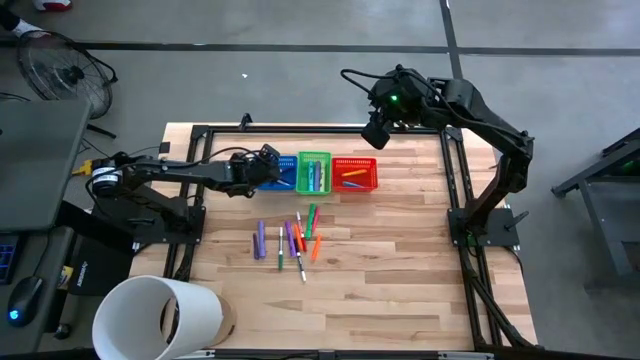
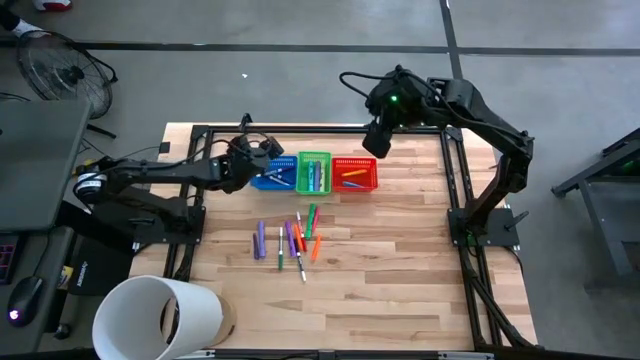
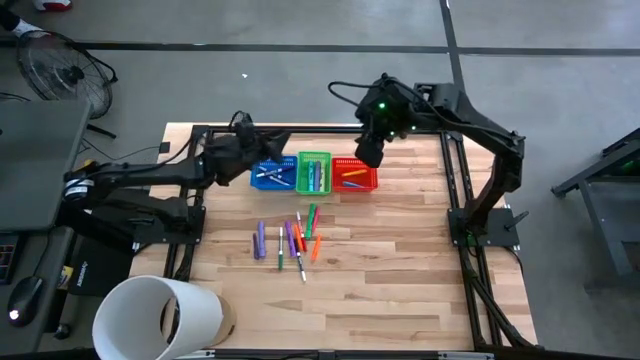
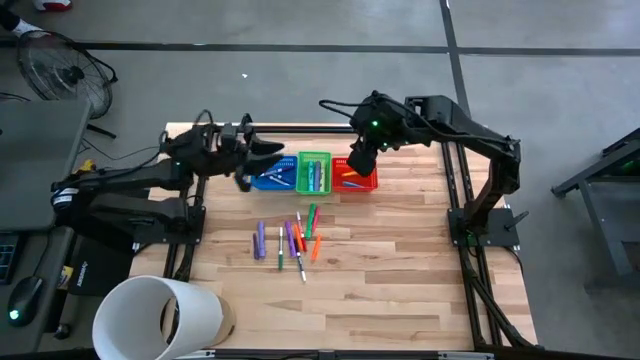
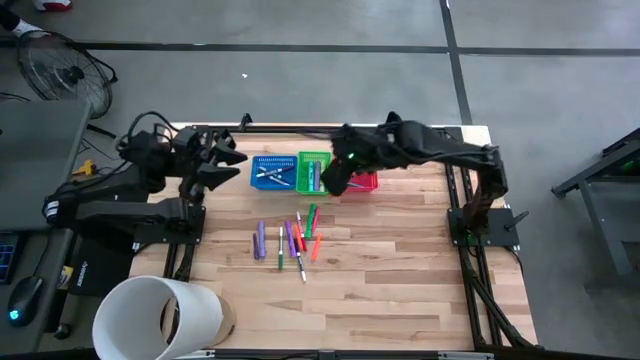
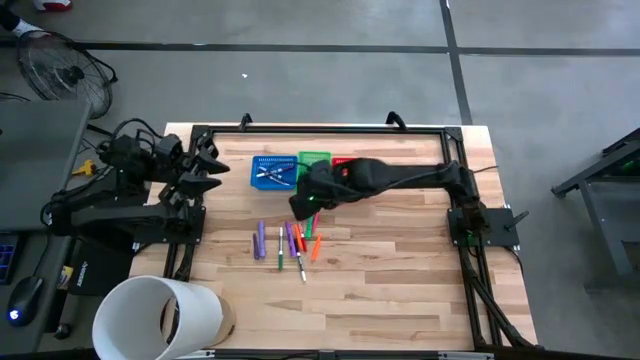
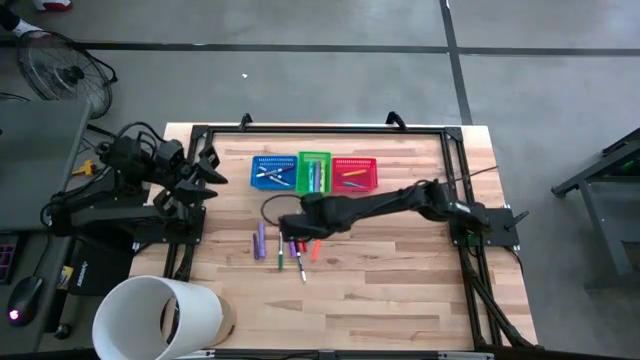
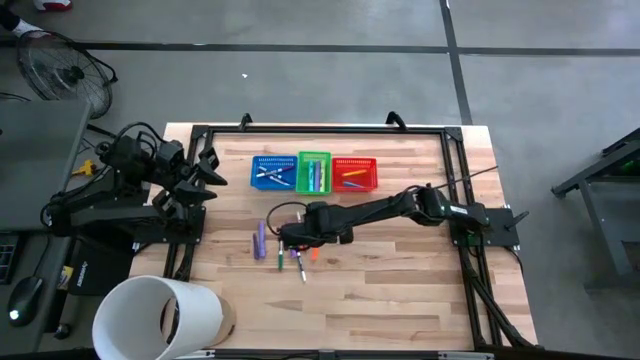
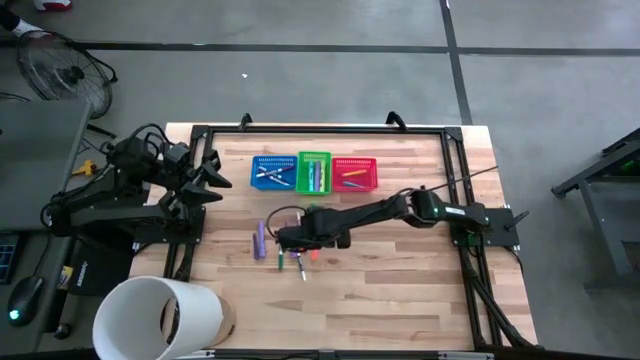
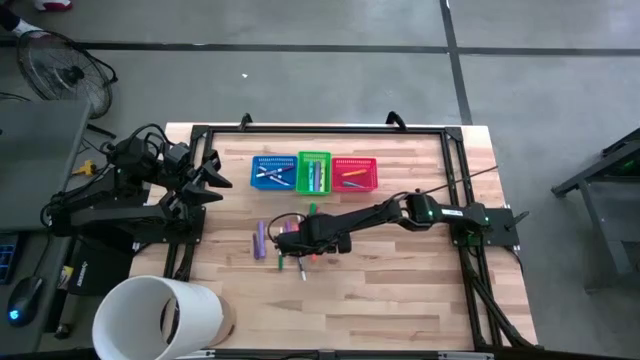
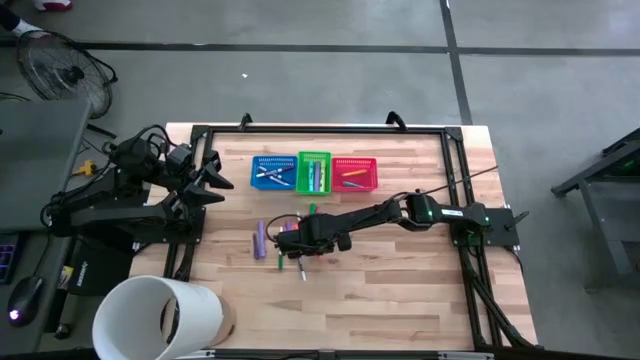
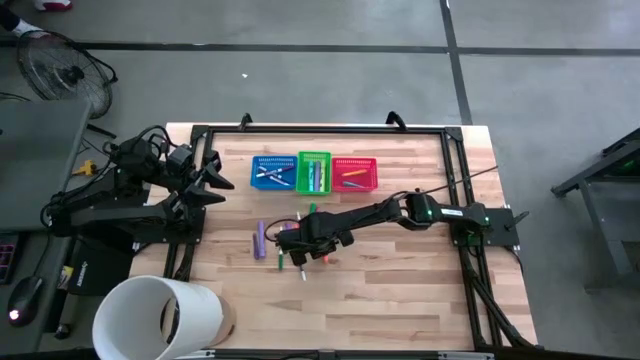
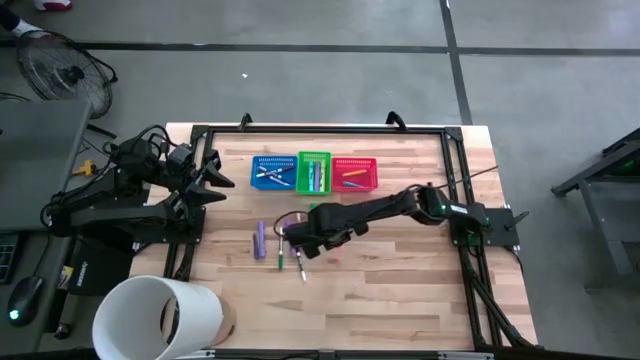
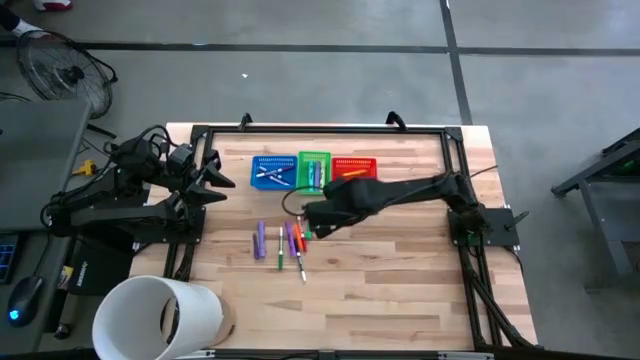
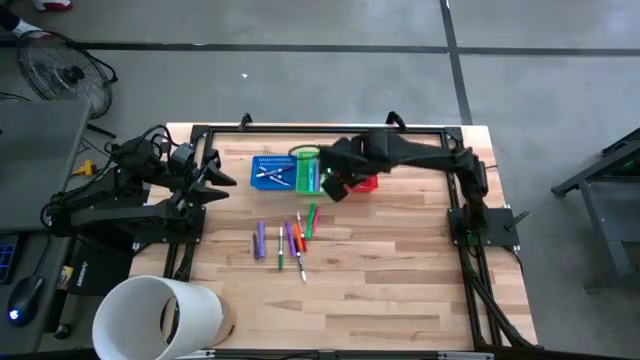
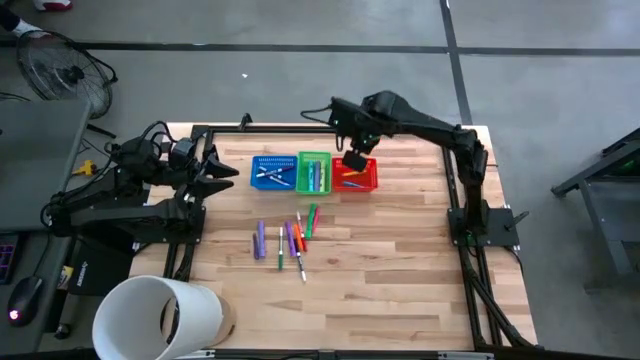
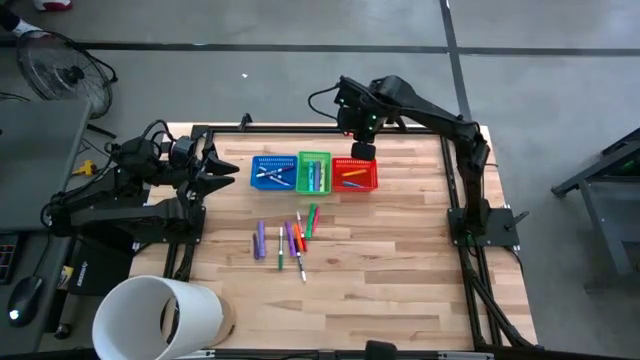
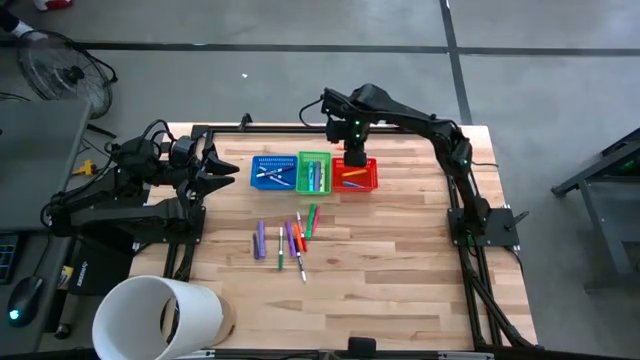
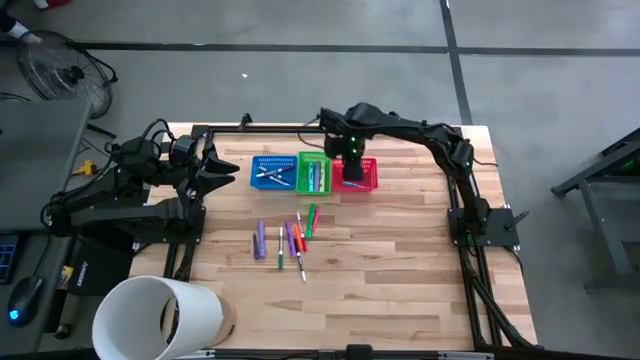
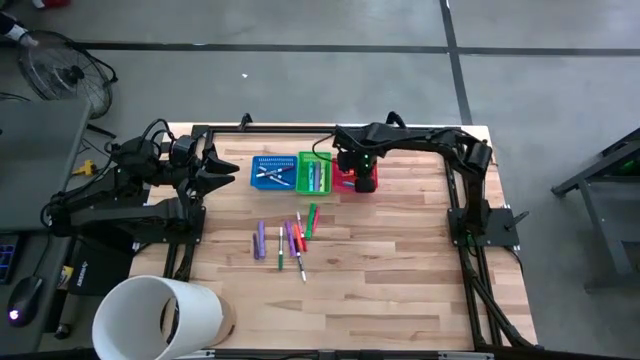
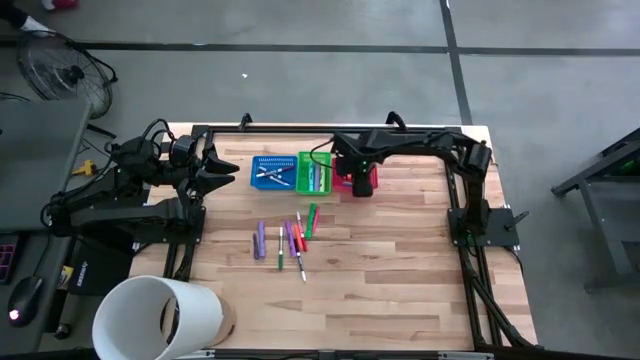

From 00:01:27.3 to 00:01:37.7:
Task: Pick & Place Markers
Put the right orange pen into the red bin

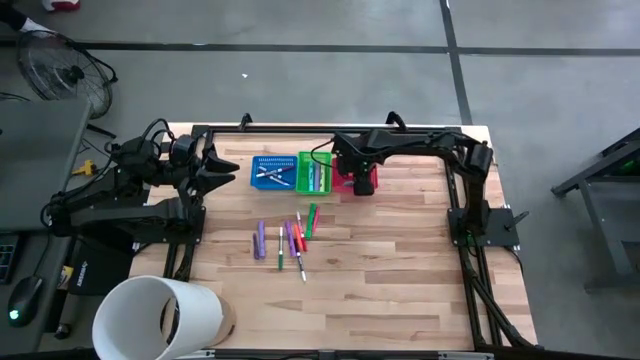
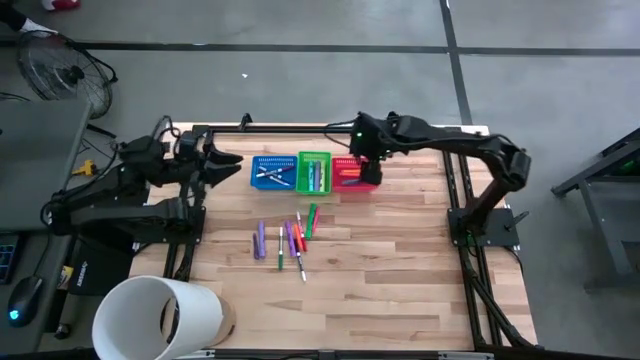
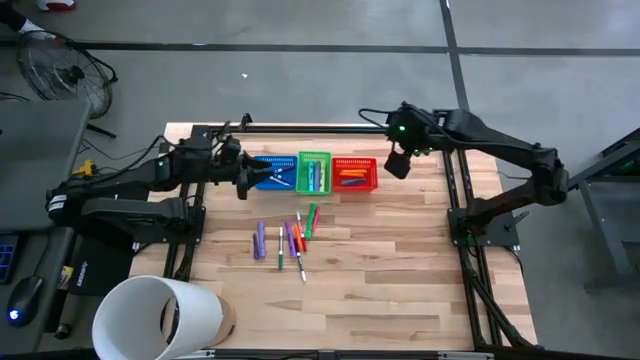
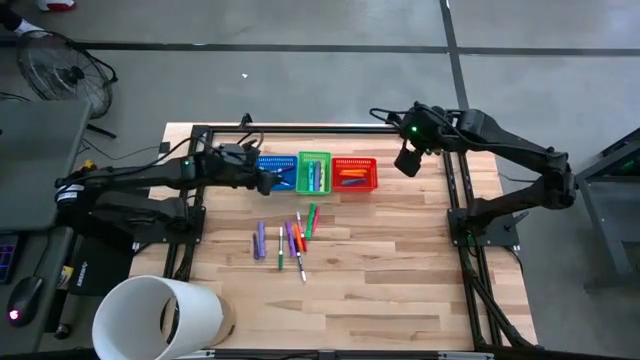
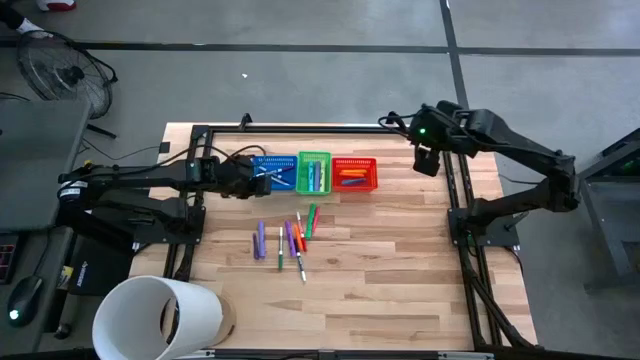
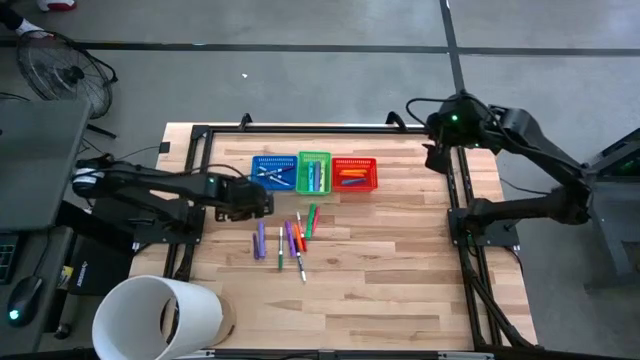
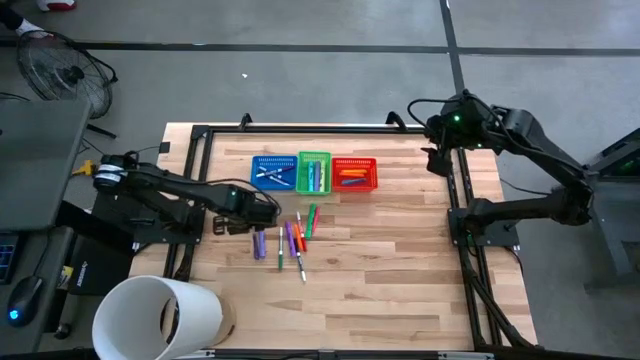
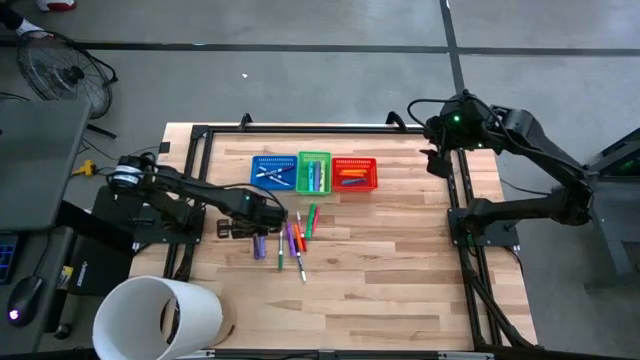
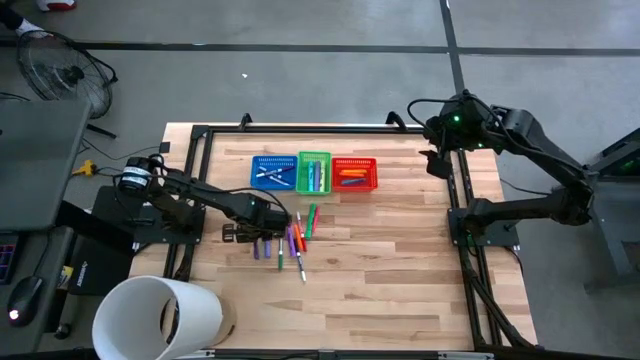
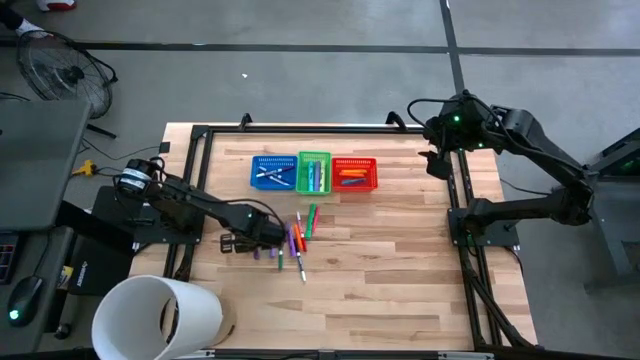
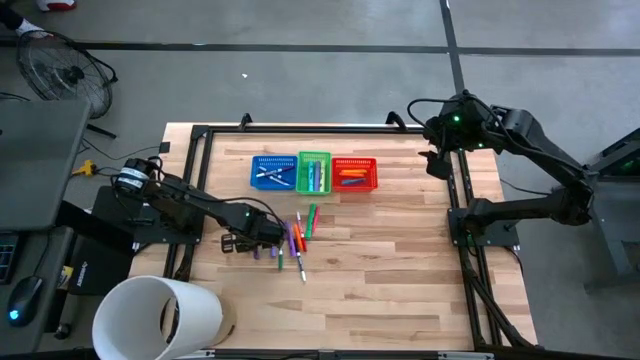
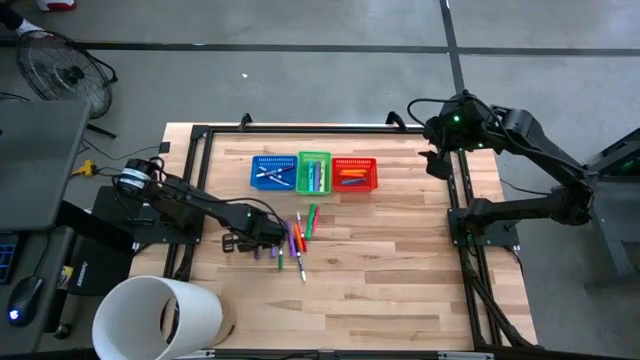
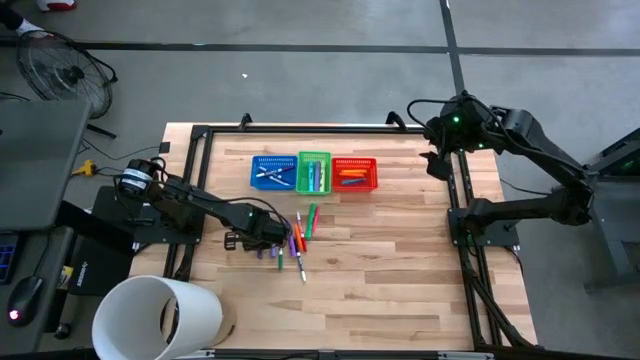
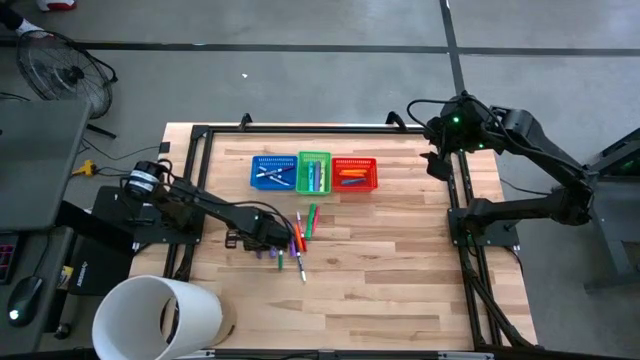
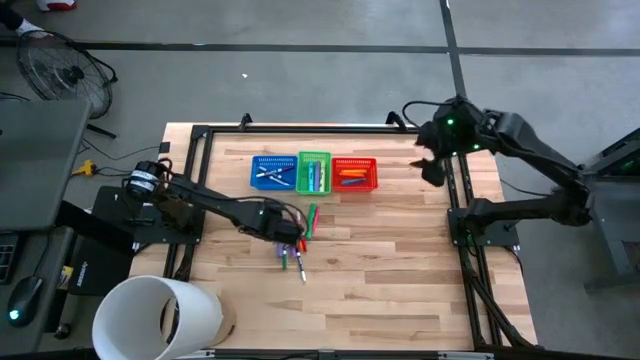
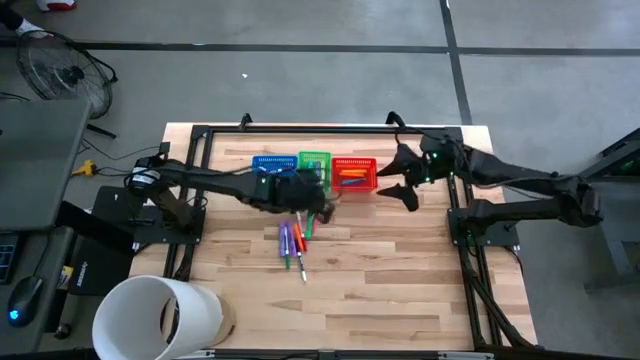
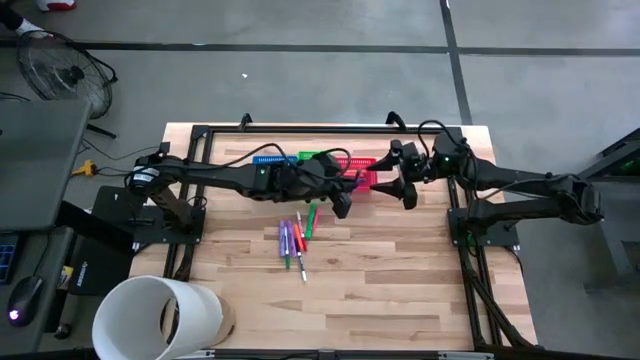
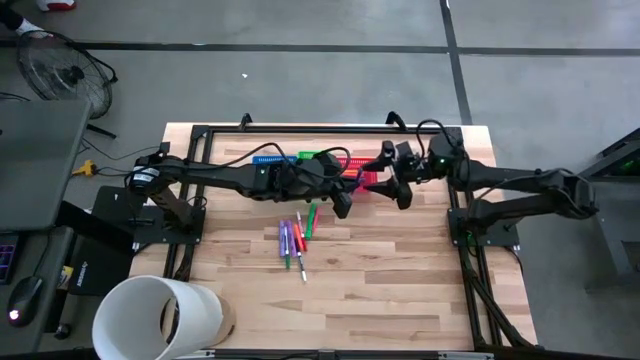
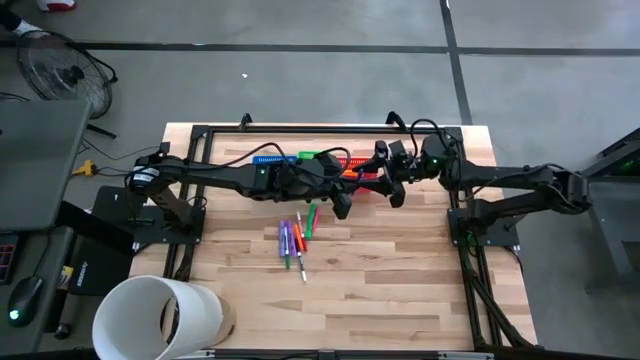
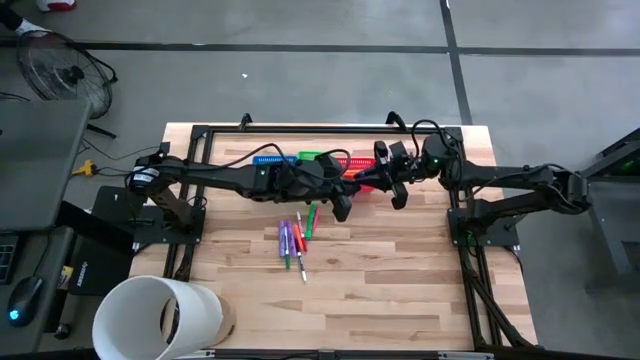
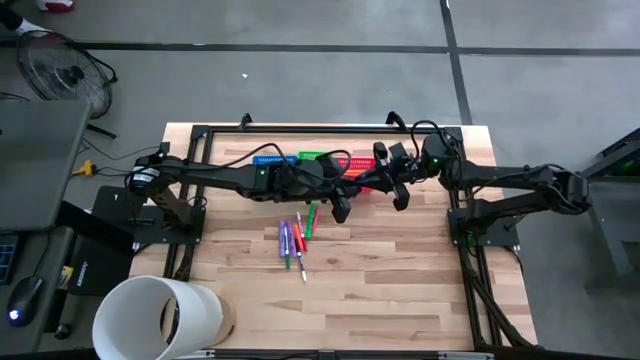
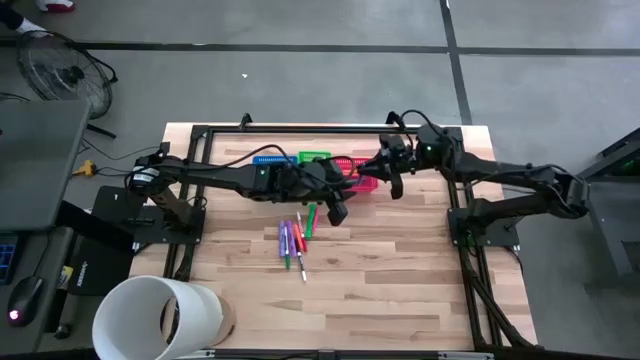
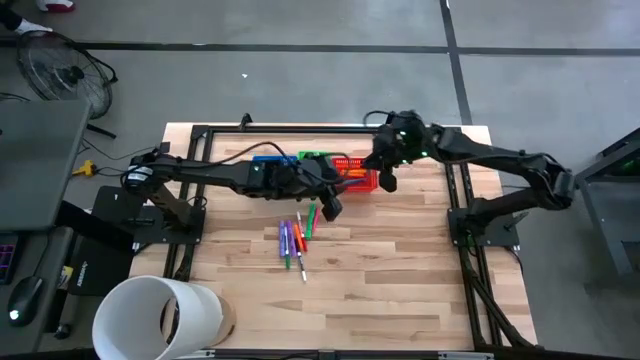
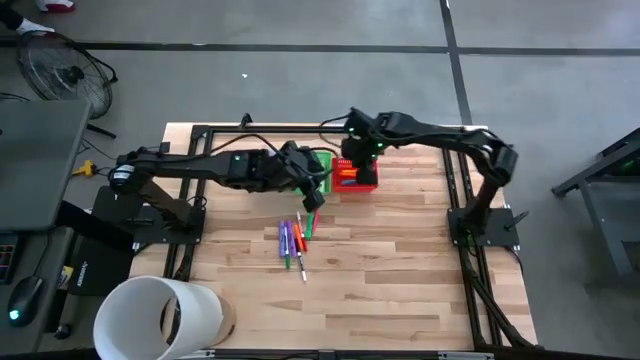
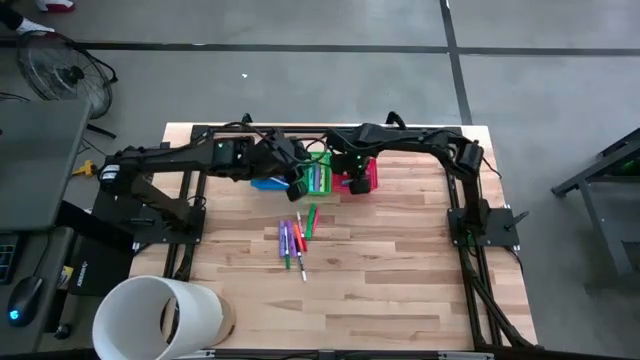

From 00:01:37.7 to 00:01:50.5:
Put the purple pen into the red bin
